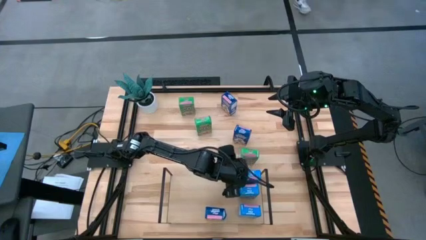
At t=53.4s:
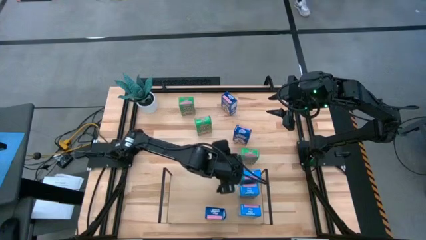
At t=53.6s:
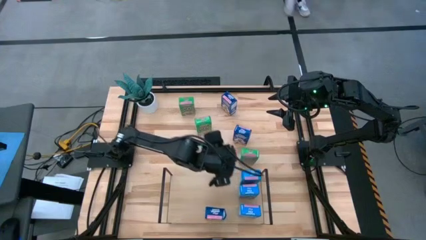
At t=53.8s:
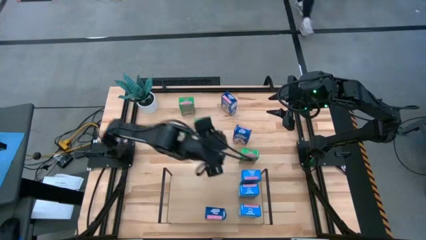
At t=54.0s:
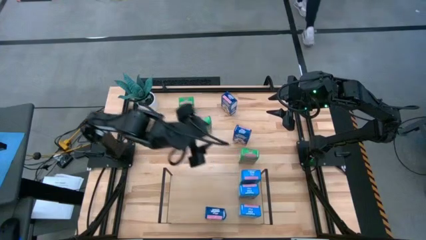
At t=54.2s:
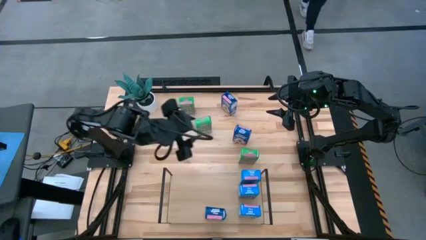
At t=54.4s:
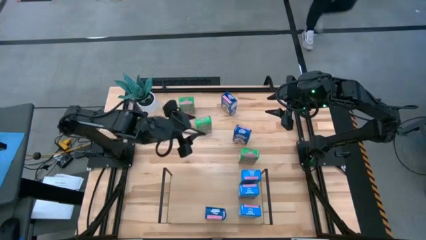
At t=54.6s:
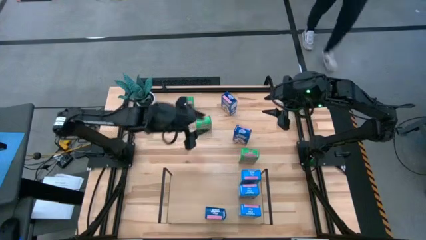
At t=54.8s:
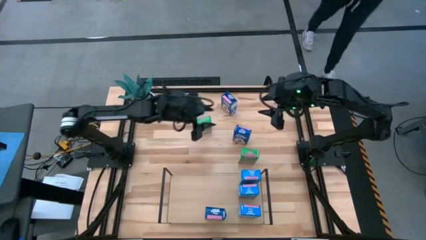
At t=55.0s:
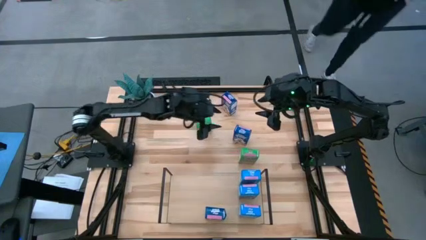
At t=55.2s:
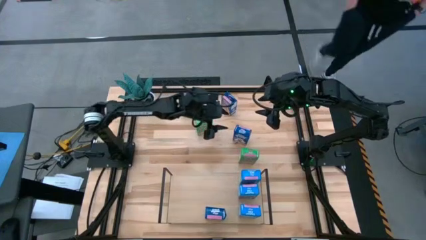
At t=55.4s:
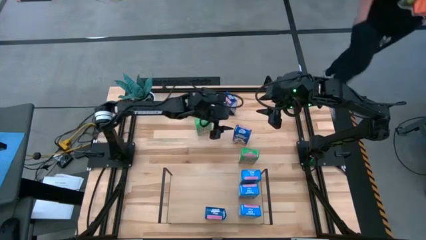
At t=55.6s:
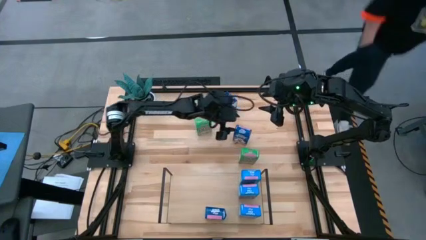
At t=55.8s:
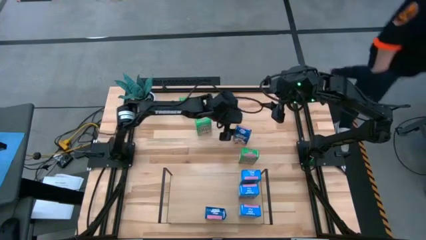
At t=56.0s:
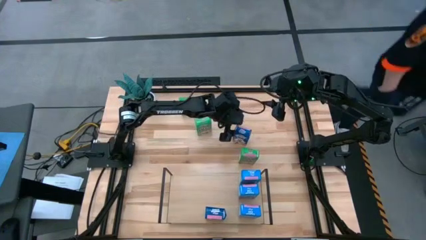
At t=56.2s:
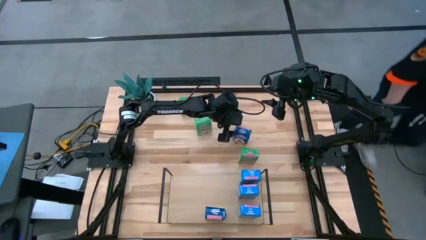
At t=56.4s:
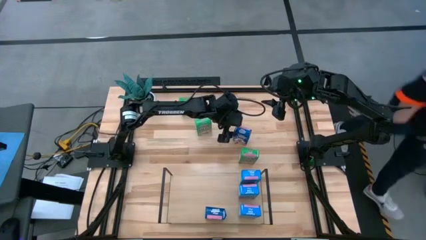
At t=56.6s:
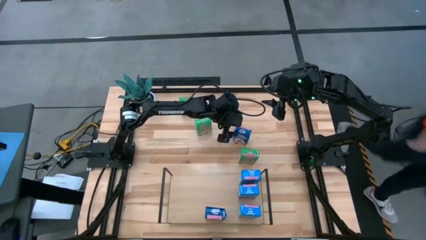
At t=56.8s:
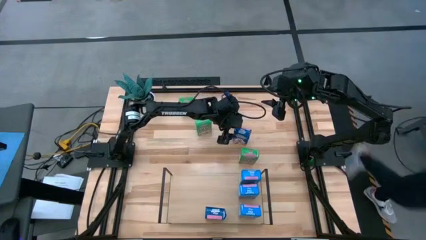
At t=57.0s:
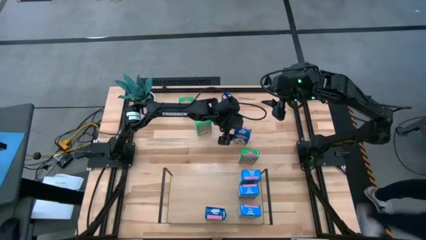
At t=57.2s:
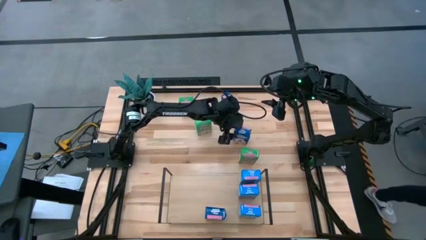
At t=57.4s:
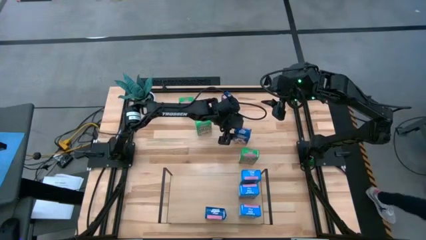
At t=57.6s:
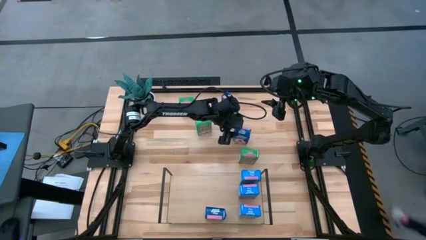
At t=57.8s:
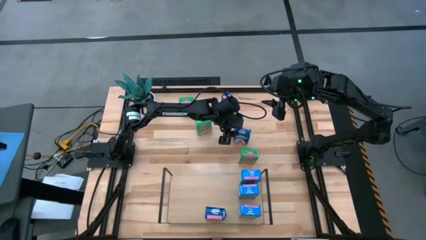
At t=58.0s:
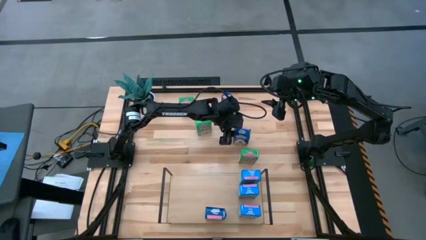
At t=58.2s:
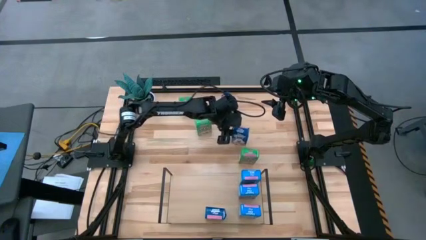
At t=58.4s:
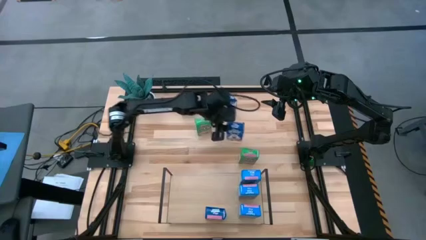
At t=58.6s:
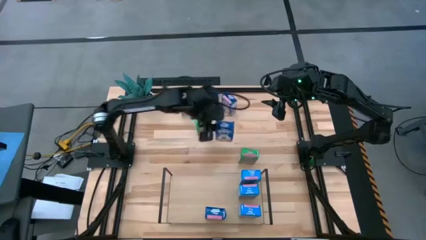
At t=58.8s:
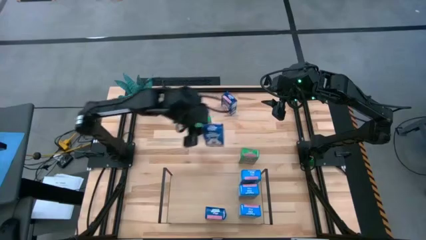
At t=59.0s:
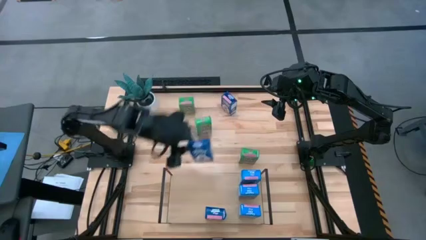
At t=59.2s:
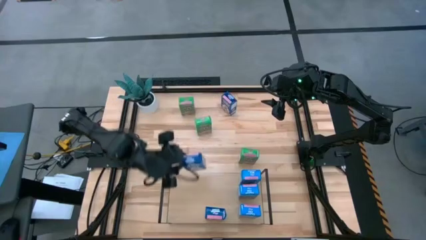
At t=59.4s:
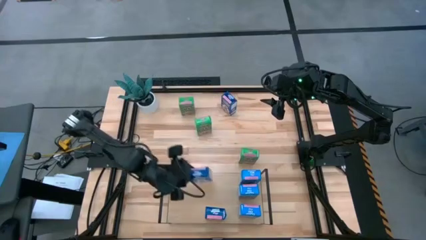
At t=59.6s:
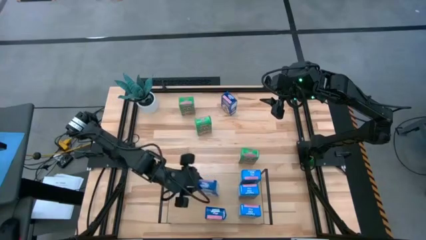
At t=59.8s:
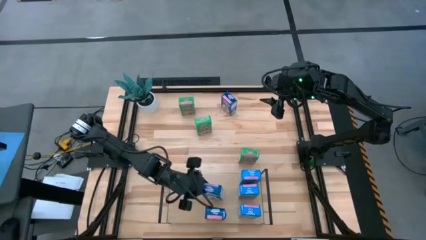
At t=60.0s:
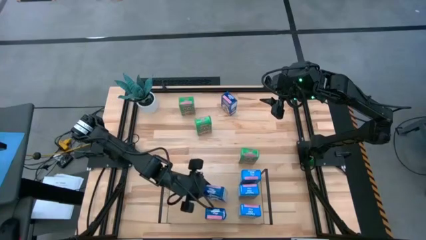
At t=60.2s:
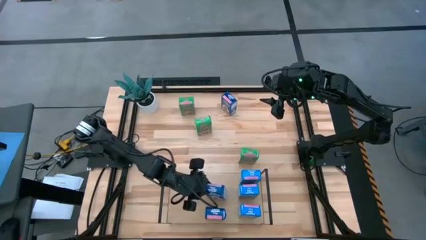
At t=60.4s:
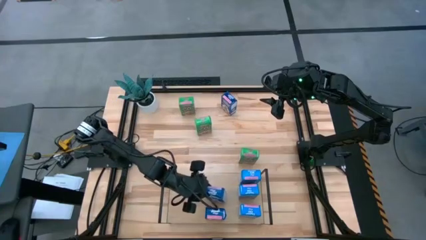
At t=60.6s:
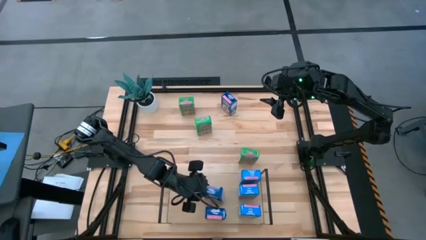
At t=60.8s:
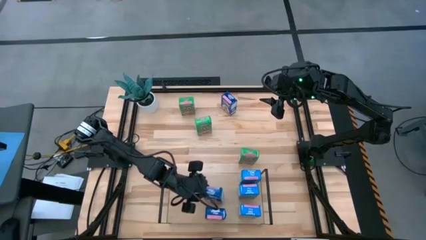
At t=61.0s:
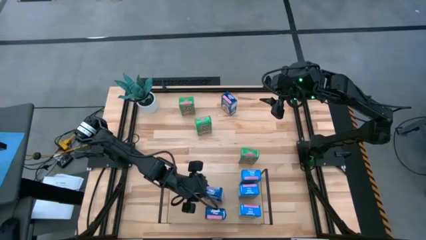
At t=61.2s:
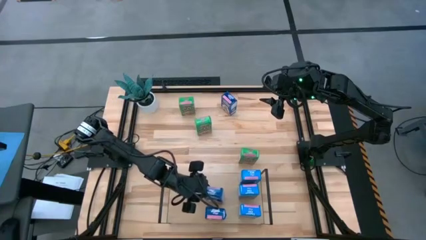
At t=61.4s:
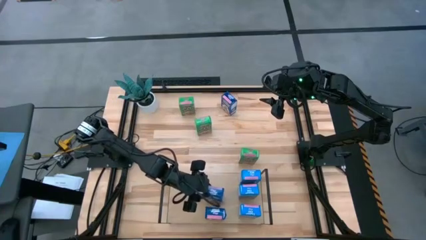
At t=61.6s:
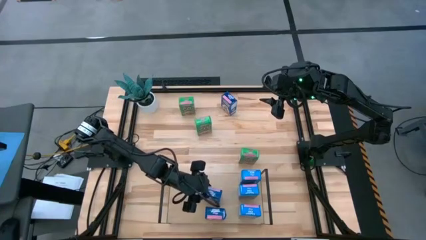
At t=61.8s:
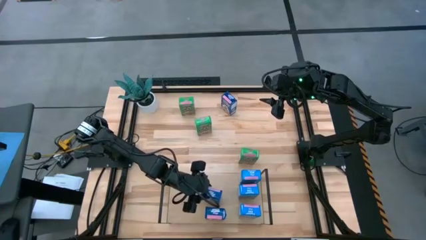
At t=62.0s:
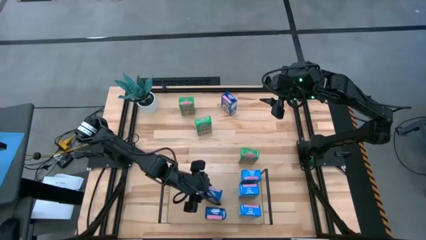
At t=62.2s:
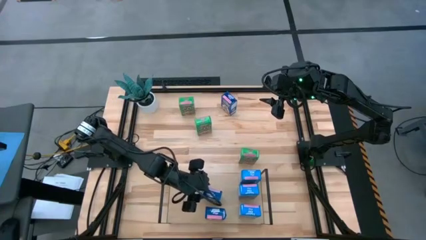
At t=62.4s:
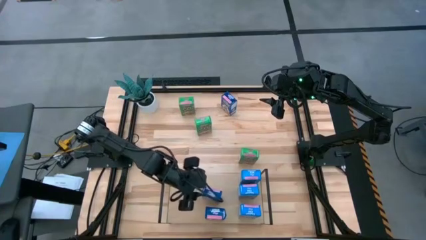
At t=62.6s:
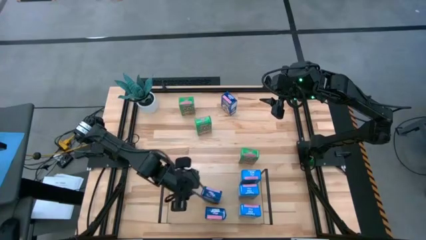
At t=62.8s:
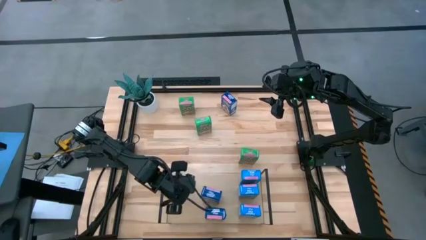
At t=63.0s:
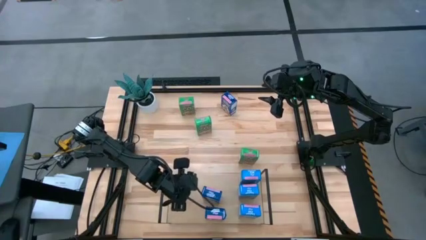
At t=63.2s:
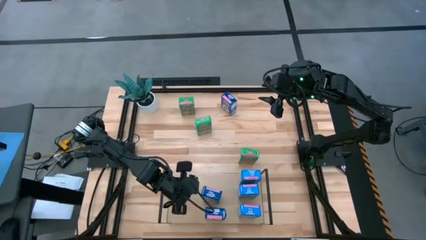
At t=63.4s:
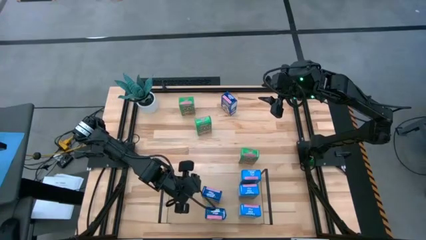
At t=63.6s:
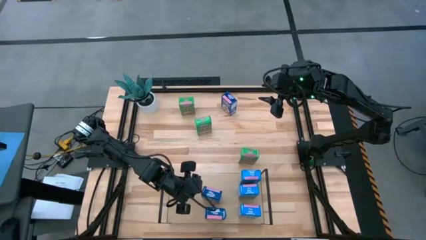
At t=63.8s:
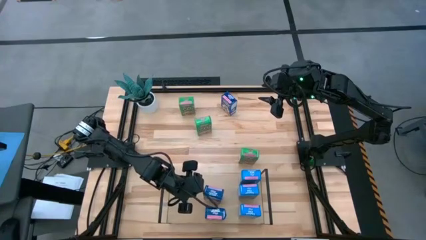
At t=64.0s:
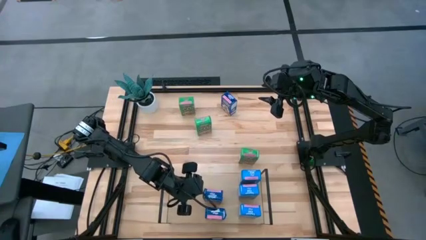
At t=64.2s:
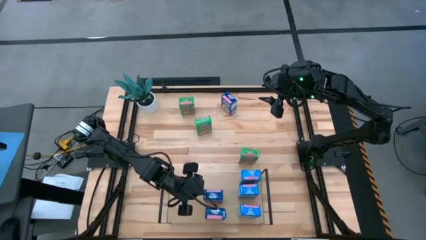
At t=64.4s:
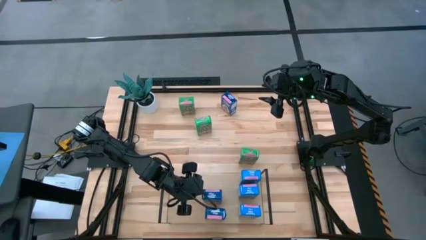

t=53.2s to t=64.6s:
Task: Stack cereal on shelf
Put the bottom blue cereal box on the shelf aligned with the other blue cereal box

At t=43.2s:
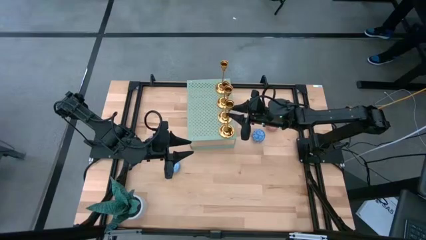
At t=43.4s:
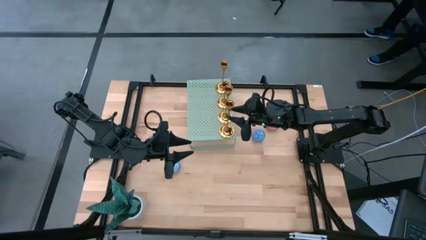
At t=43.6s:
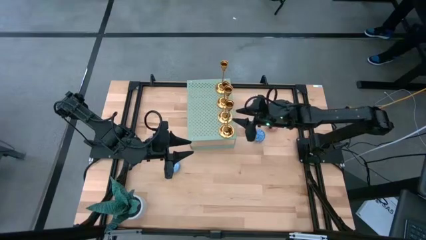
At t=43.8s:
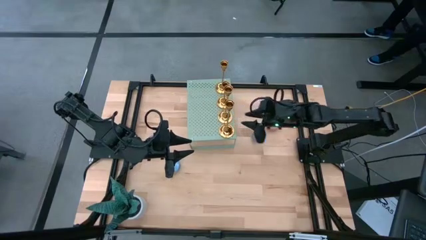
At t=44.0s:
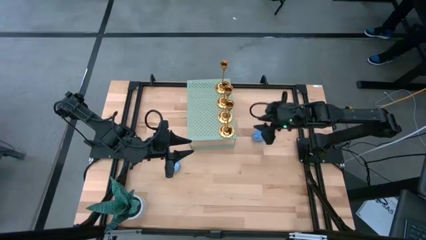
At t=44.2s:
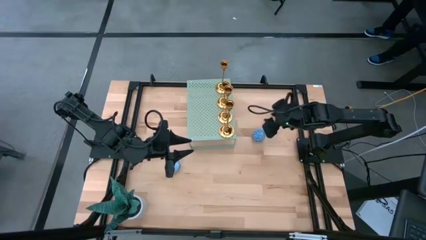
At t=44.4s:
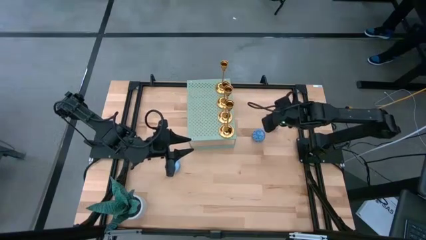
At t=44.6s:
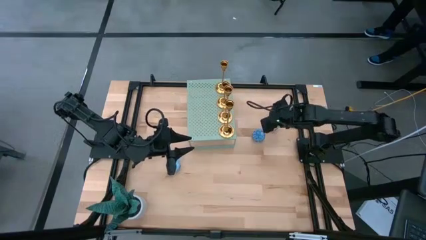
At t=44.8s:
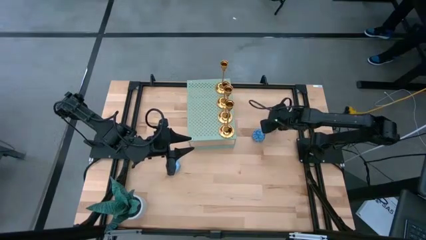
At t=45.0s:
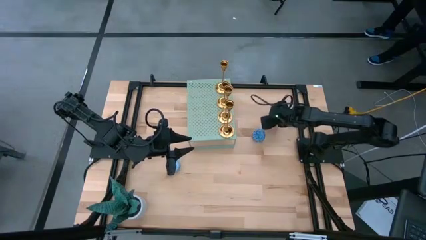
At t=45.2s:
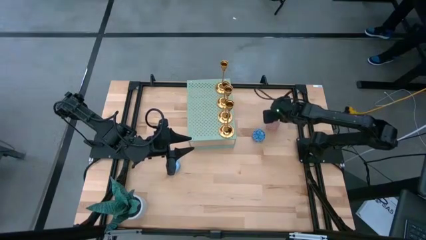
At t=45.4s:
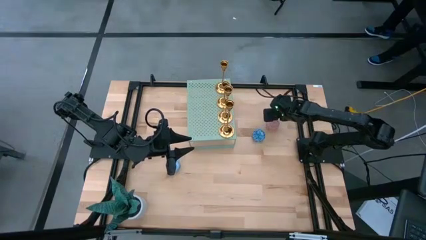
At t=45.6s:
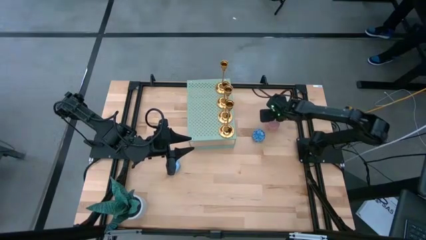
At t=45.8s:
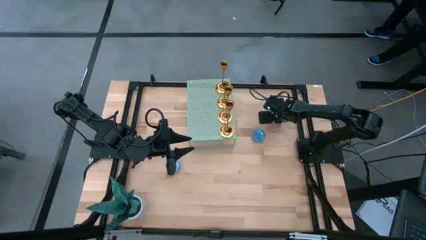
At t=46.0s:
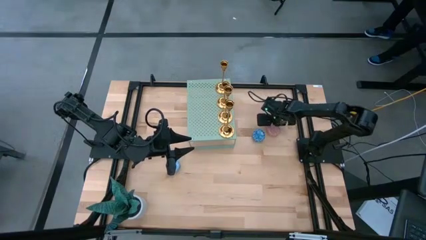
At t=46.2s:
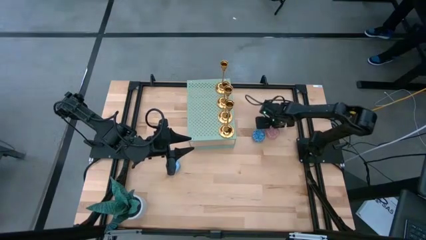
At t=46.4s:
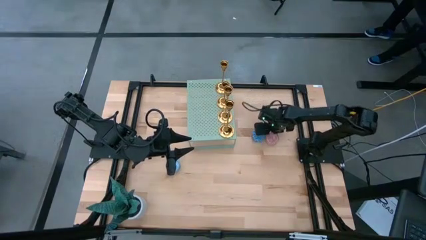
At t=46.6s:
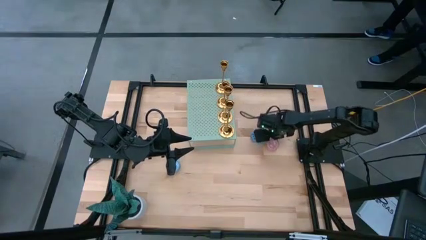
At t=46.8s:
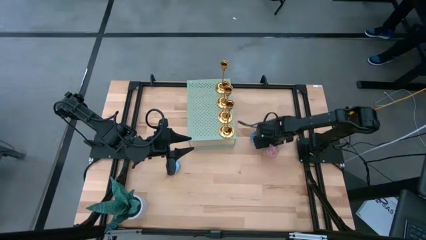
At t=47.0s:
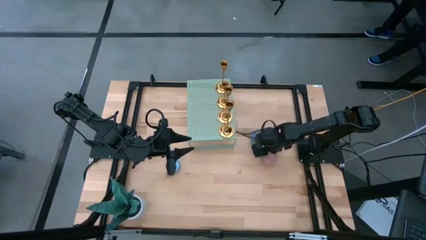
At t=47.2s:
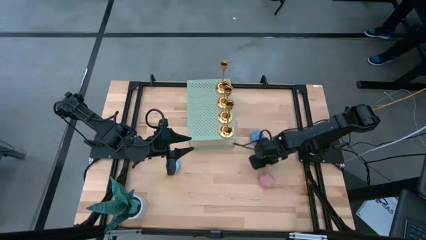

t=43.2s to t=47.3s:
Task: Pick & Place candle stick holders
Move the pink scented candle to the bottom right
